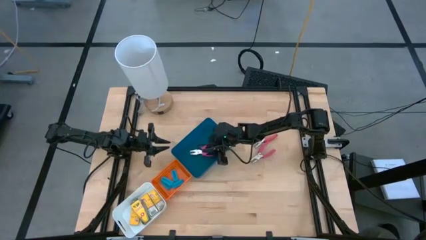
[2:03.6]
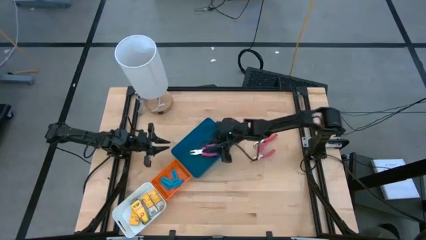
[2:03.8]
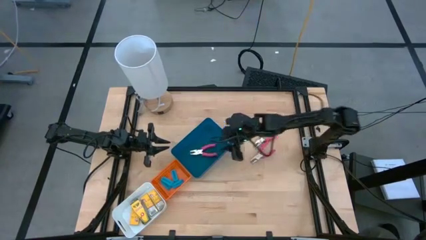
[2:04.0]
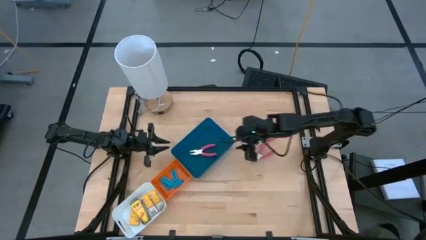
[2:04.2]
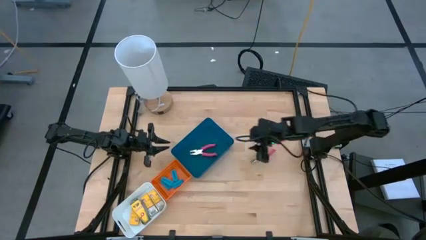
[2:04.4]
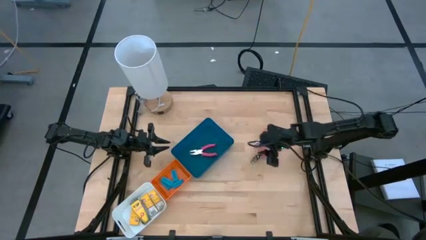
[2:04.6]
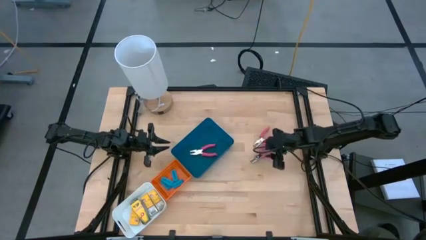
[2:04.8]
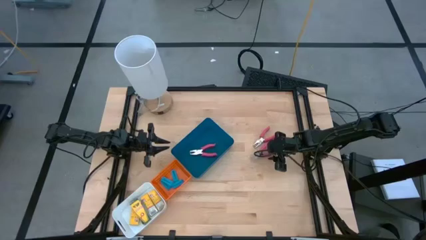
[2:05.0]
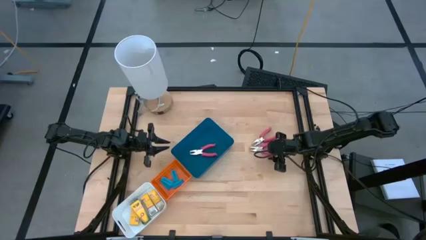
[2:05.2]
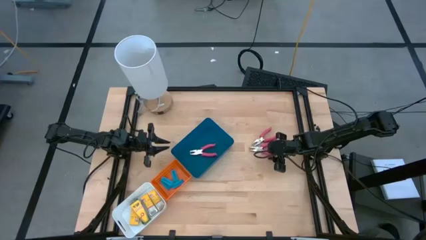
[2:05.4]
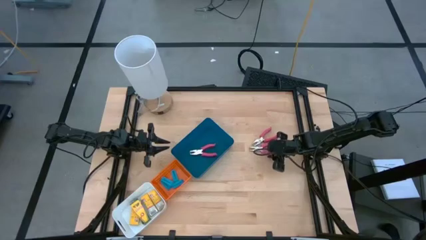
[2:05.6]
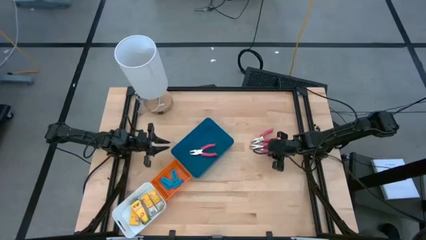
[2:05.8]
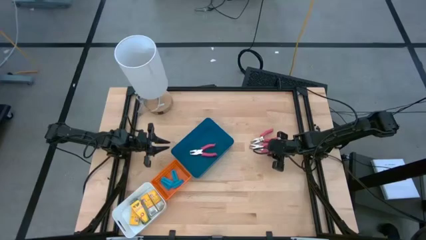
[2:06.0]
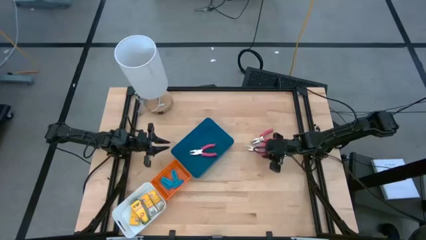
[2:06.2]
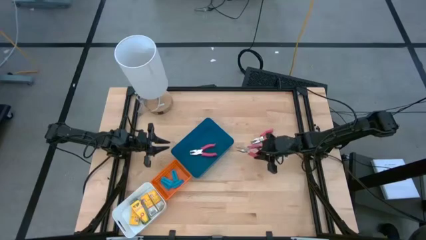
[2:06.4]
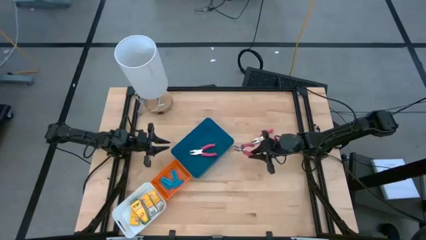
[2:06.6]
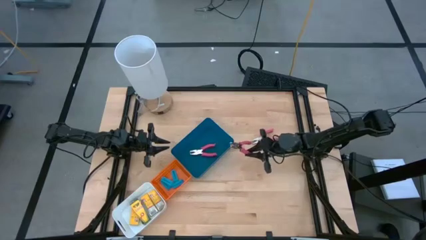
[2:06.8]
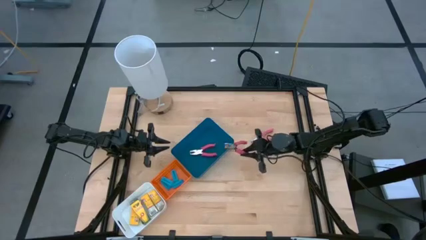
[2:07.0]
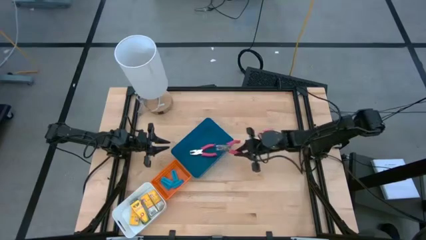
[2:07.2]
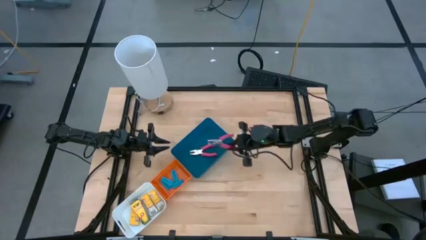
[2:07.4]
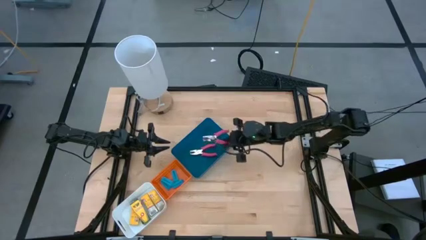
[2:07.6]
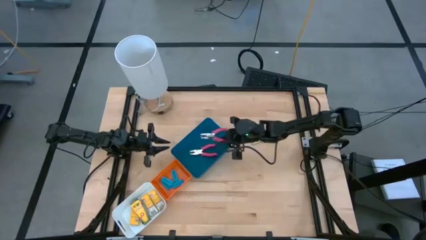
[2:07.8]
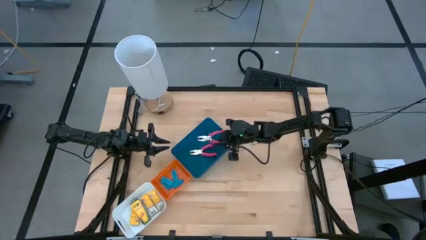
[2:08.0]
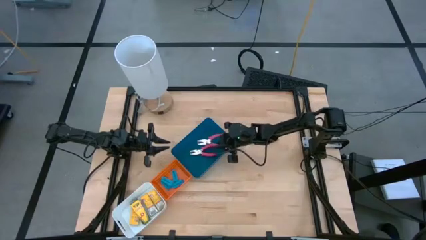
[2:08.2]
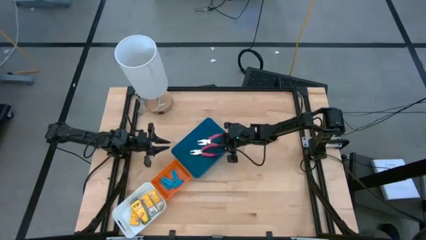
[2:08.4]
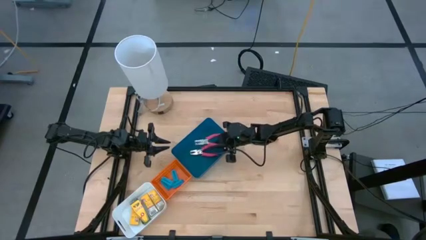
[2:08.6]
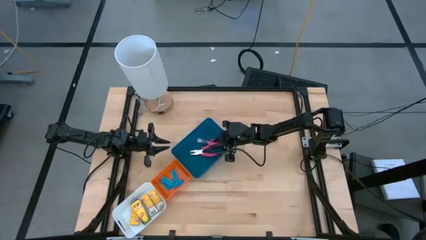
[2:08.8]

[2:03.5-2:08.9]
Task: Pick & Place School Supplies
Put the pink hole puncher into the blue bin

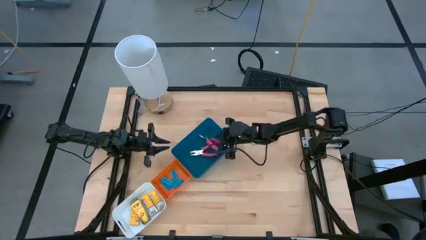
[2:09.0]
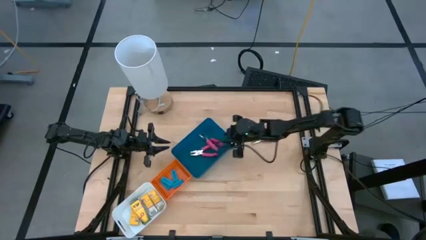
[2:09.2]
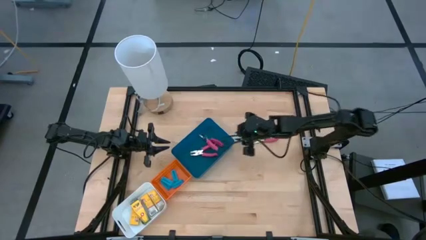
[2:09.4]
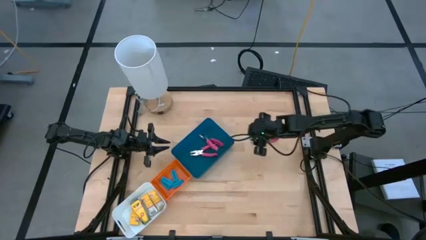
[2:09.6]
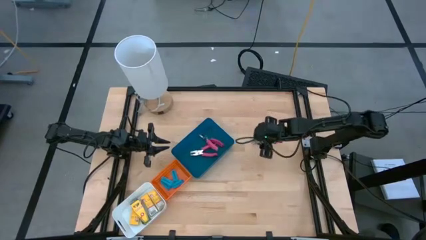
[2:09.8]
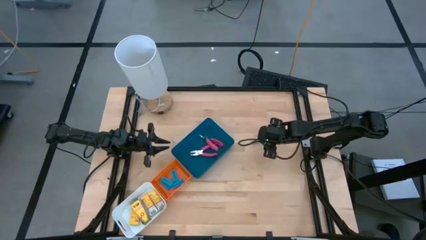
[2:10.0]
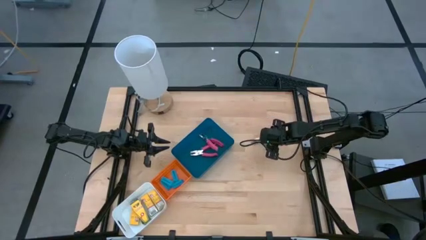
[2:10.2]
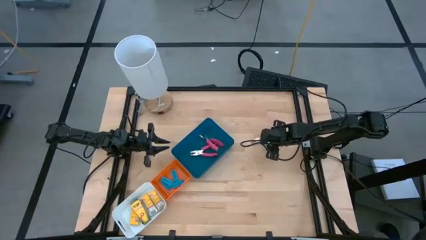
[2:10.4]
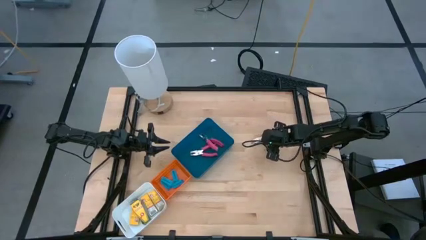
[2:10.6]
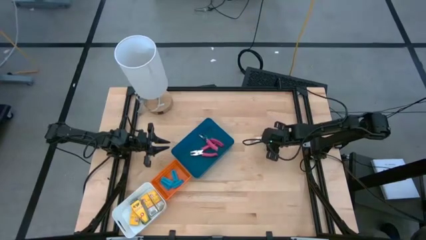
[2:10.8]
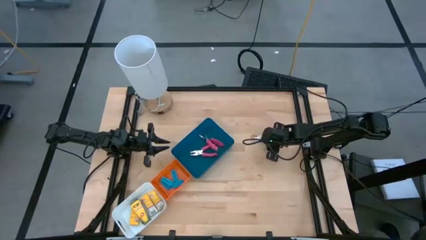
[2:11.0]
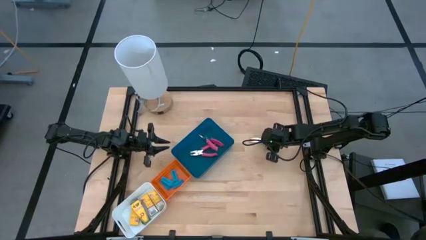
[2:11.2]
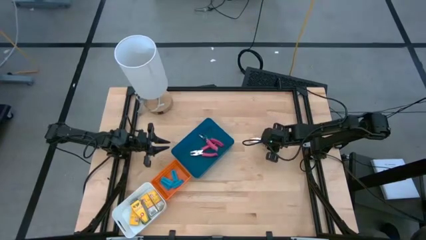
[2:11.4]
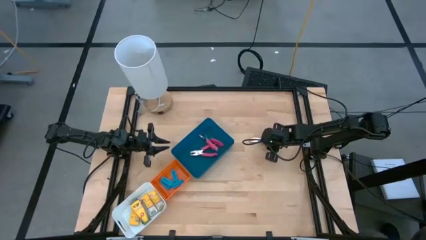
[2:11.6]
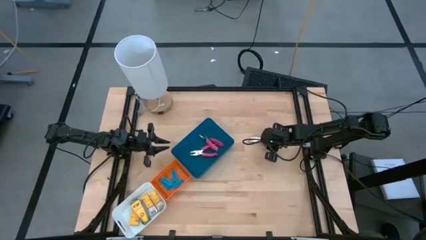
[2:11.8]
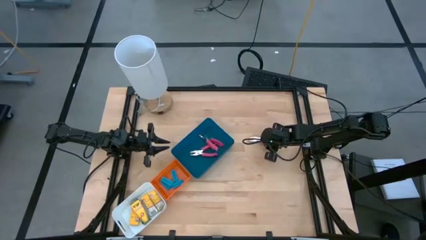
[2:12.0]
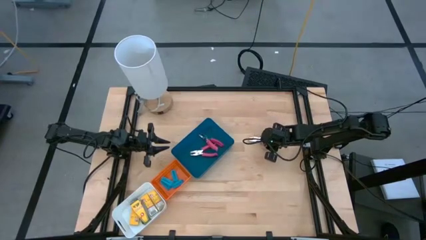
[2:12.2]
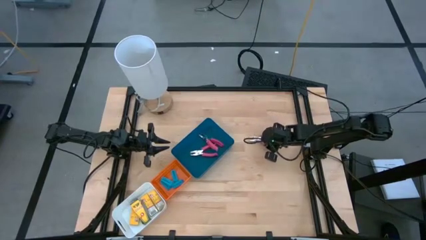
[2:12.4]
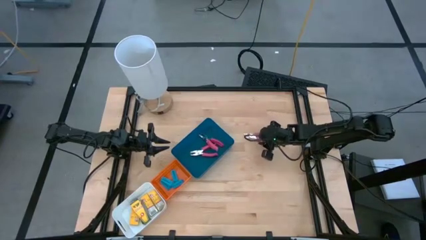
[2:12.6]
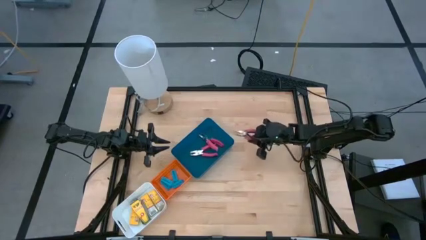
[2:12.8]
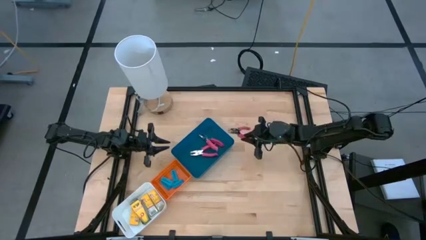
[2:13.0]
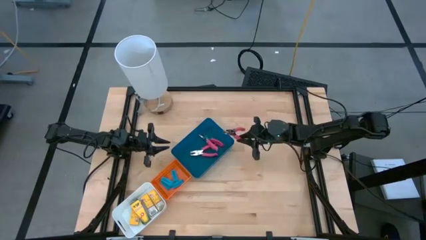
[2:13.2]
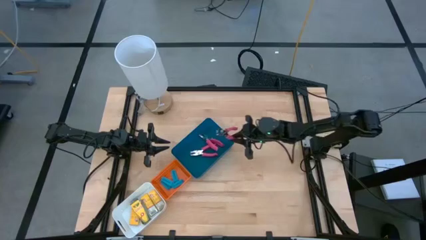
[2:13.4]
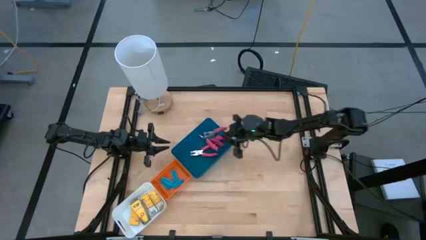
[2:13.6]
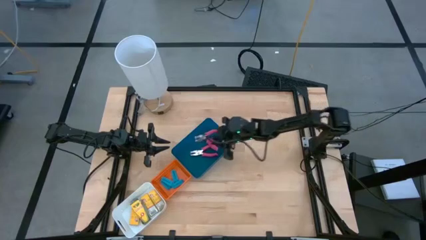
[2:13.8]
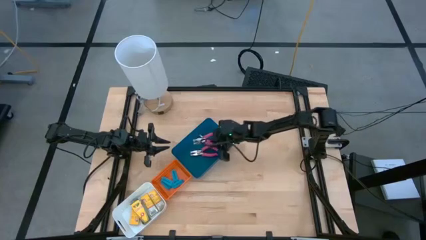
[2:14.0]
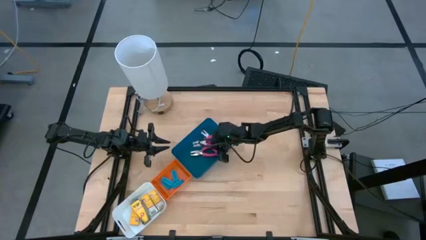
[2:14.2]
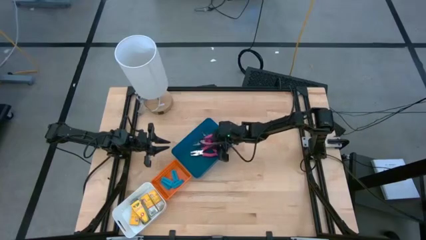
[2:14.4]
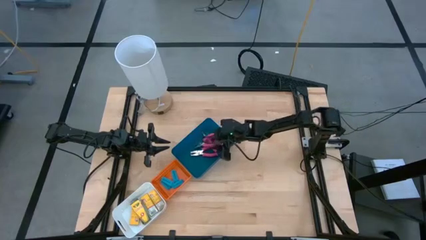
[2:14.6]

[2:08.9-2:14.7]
Put the pink hole puncher into the blue bin

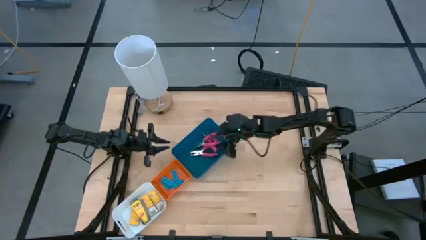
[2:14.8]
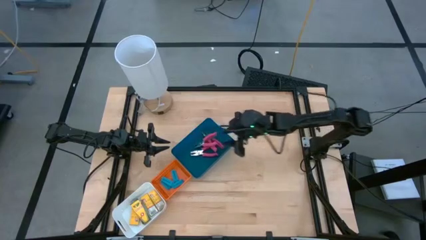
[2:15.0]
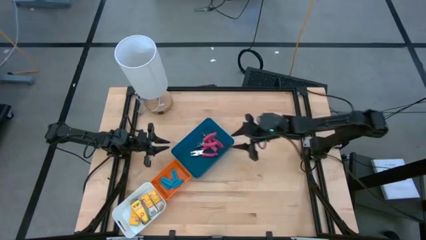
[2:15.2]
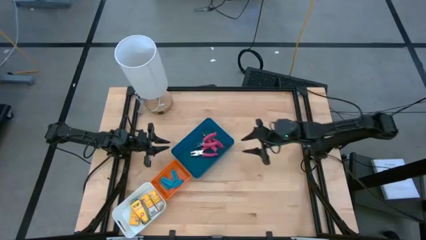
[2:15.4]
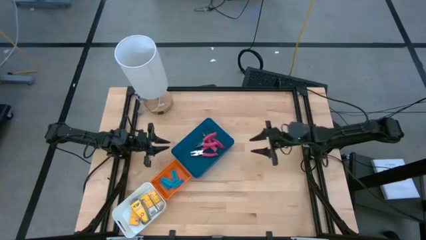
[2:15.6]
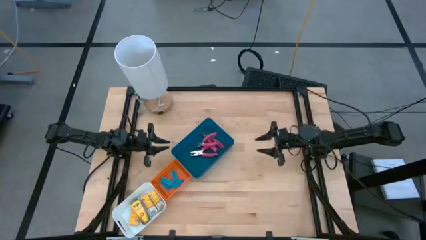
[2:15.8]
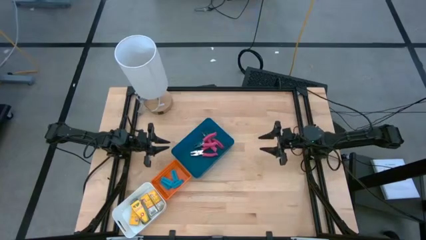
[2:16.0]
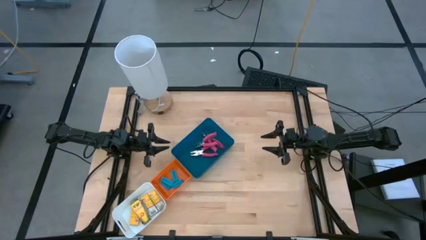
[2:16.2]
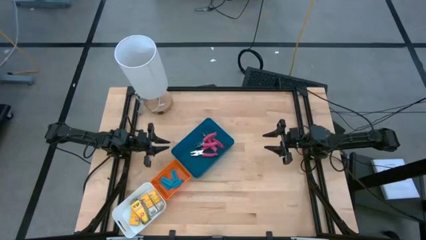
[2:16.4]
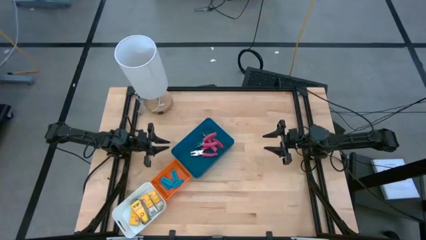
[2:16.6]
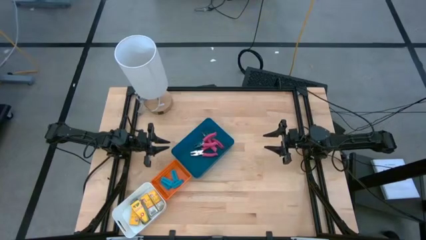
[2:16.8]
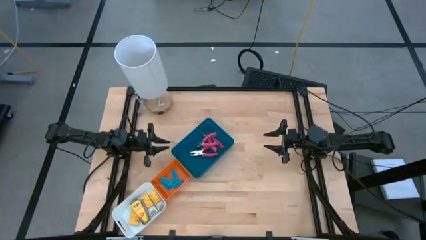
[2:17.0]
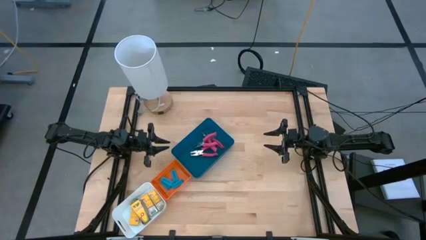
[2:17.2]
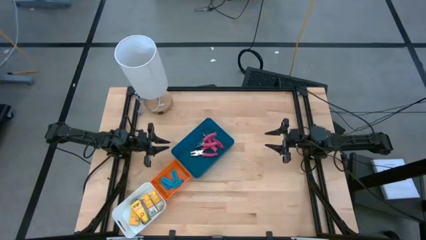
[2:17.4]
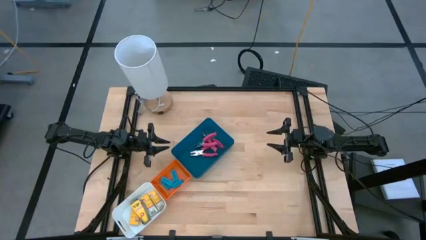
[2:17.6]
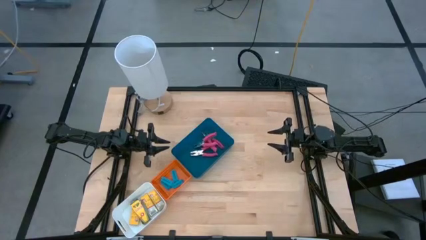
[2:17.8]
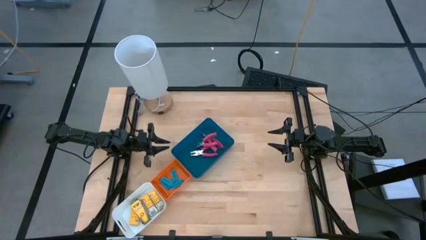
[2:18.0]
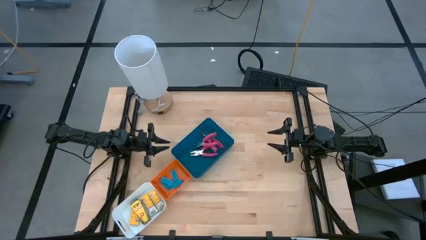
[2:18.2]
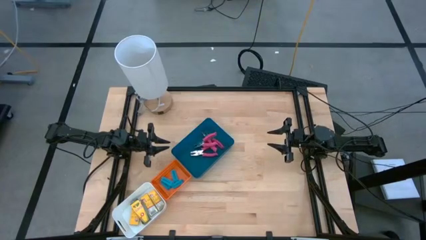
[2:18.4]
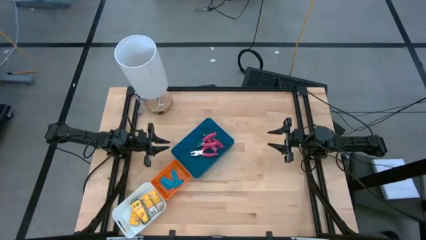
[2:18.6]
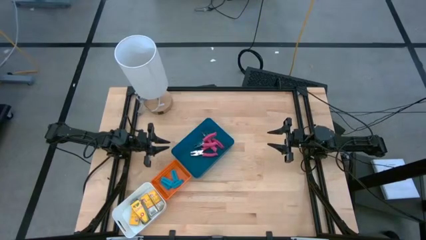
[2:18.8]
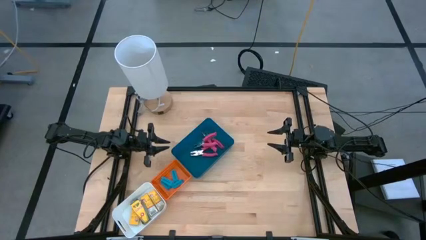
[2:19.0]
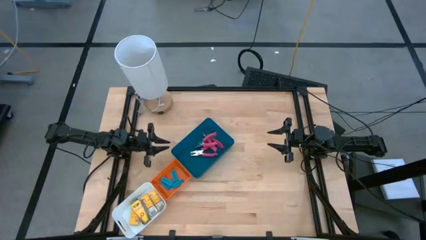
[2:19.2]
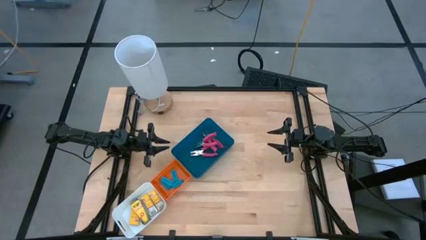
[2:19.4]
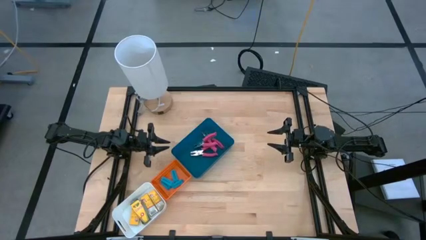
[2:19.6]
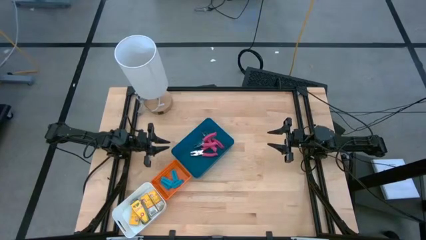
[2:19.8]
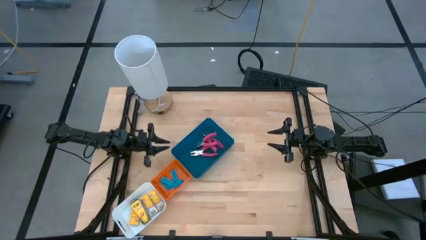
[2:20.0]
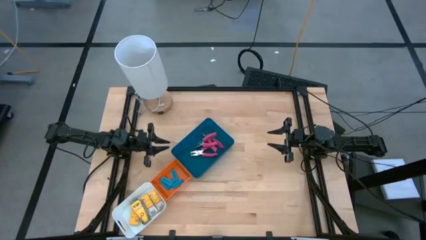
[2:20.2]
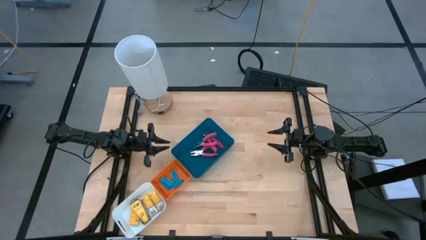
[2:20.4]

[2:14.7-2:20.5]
Return to Home Position
